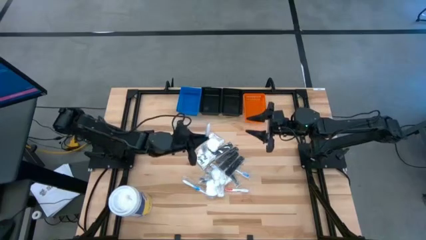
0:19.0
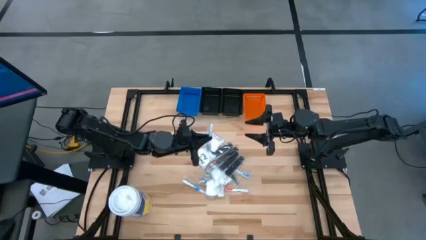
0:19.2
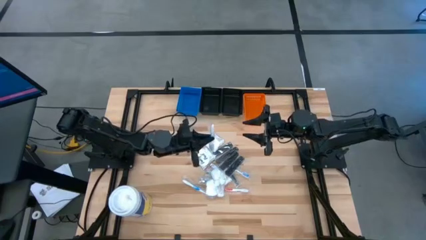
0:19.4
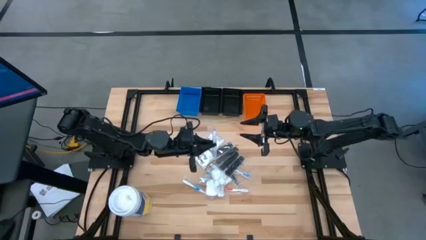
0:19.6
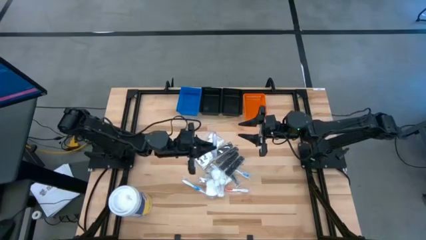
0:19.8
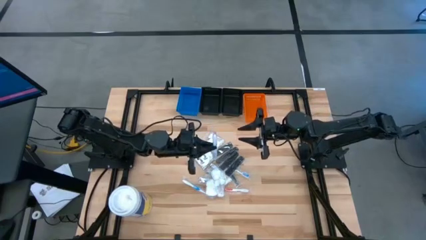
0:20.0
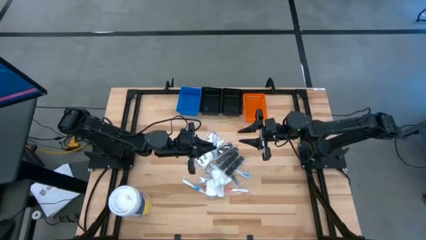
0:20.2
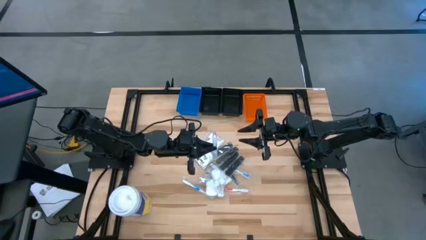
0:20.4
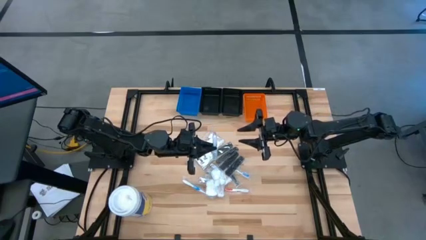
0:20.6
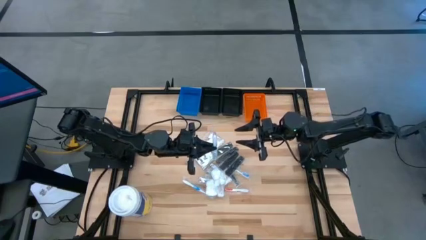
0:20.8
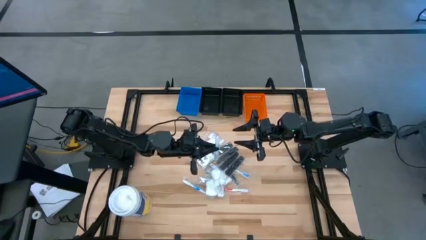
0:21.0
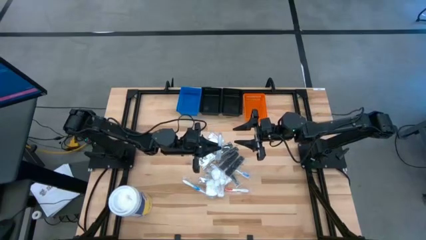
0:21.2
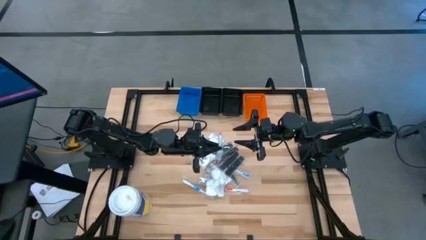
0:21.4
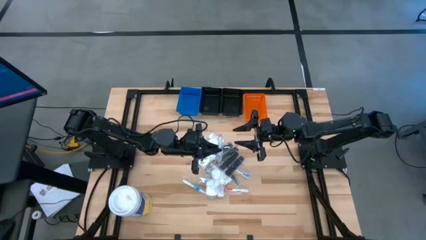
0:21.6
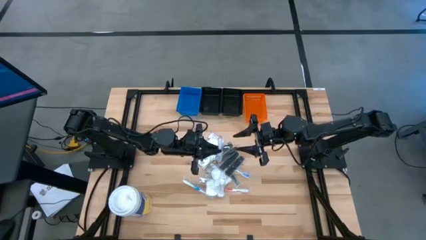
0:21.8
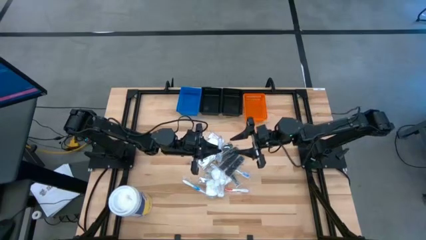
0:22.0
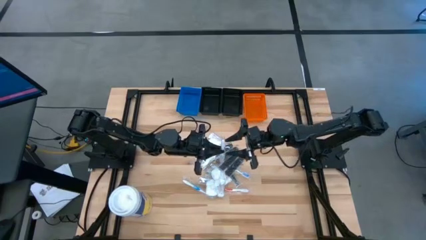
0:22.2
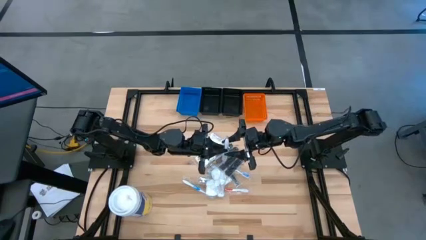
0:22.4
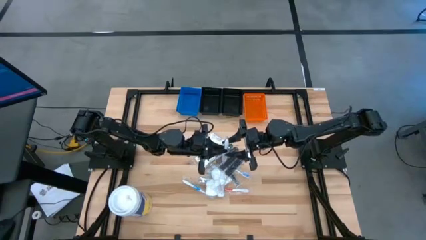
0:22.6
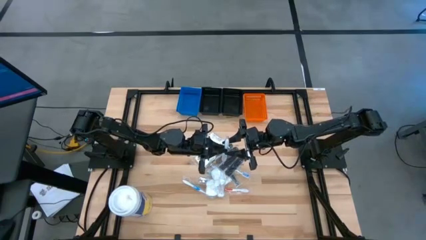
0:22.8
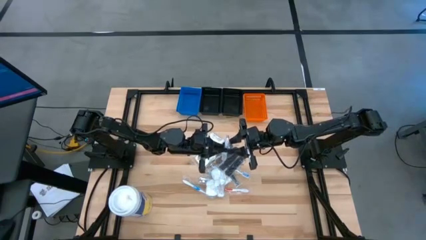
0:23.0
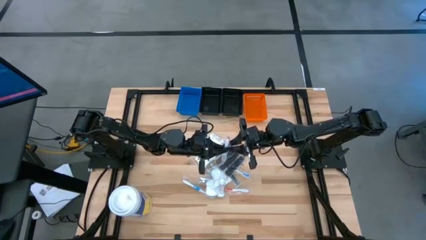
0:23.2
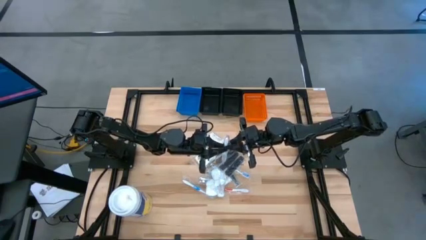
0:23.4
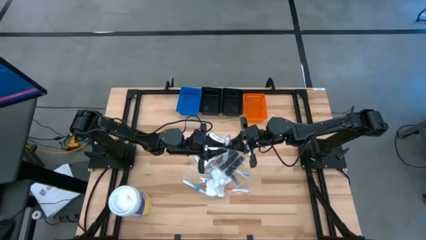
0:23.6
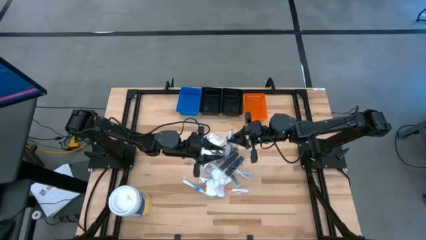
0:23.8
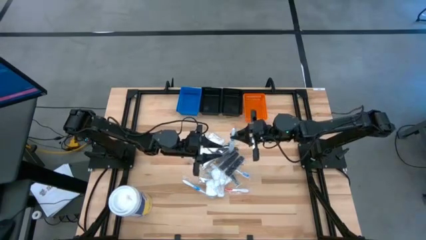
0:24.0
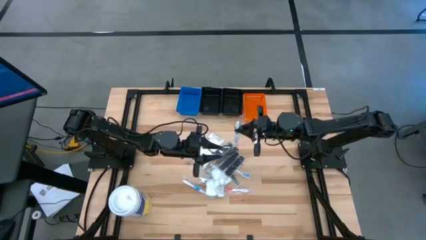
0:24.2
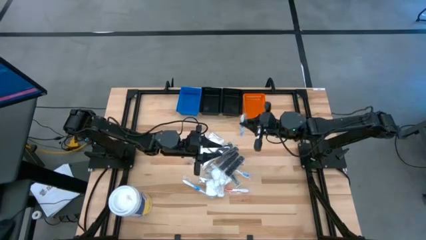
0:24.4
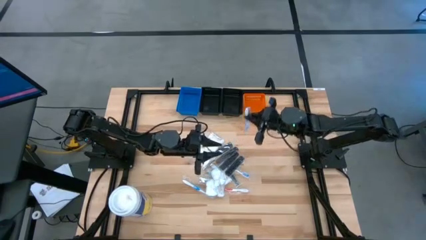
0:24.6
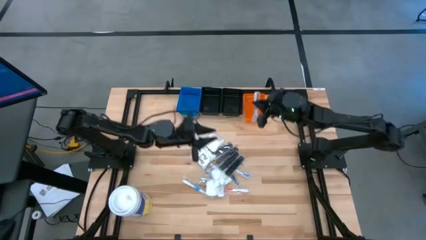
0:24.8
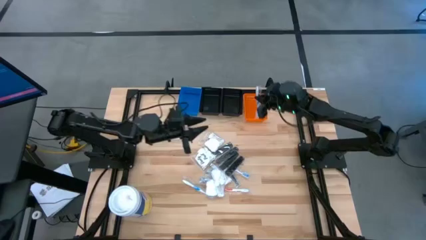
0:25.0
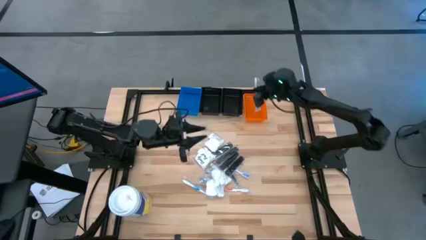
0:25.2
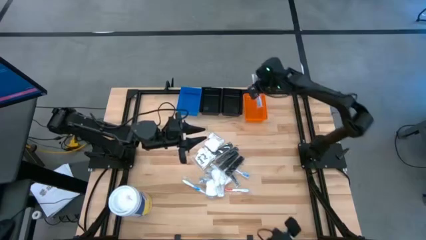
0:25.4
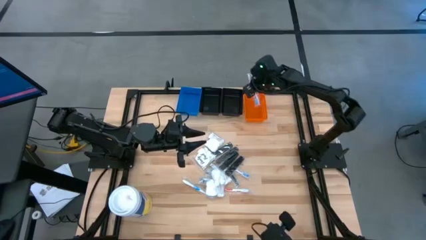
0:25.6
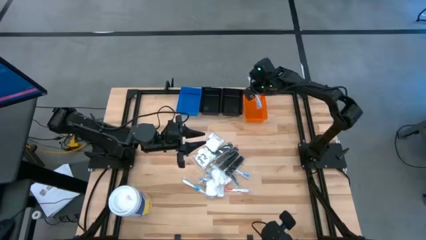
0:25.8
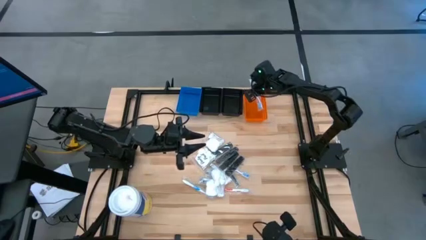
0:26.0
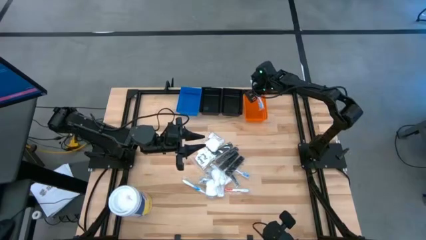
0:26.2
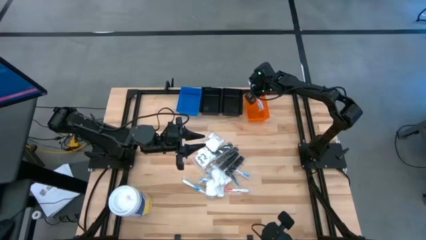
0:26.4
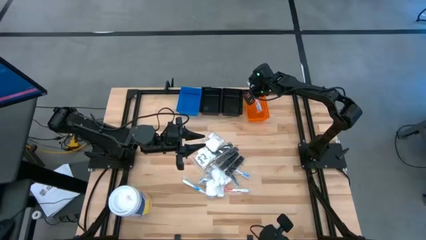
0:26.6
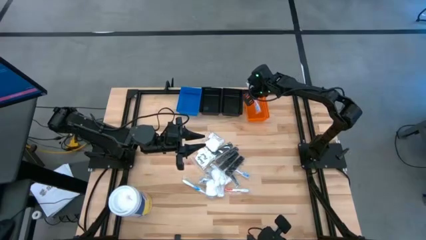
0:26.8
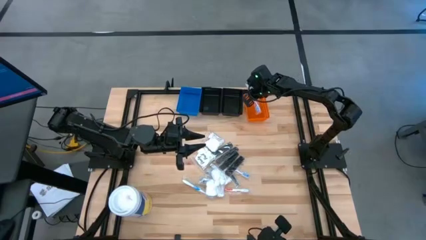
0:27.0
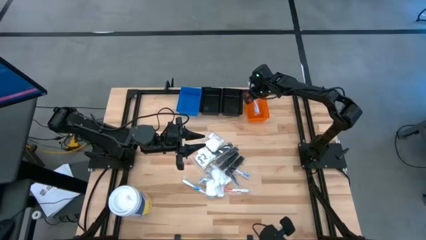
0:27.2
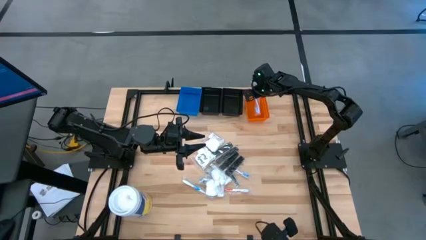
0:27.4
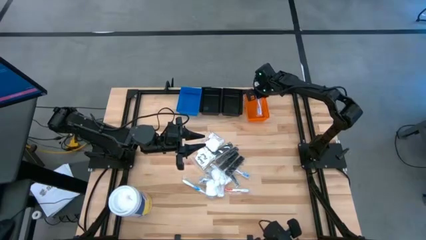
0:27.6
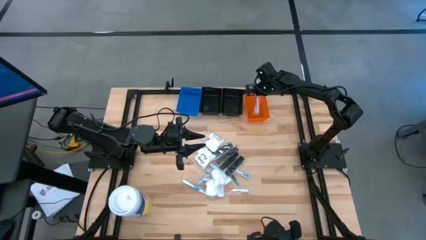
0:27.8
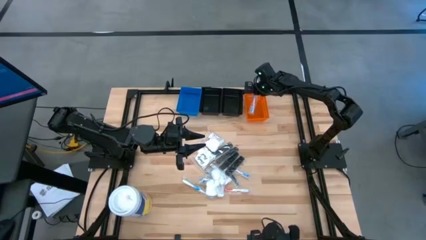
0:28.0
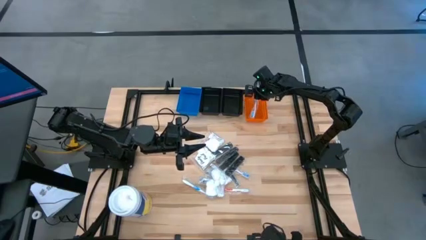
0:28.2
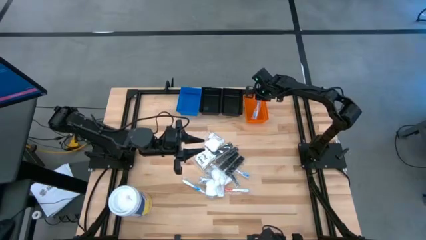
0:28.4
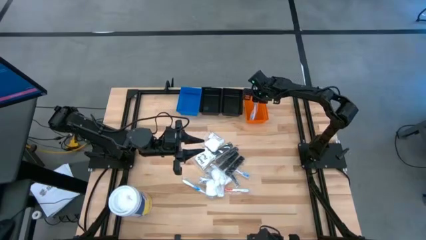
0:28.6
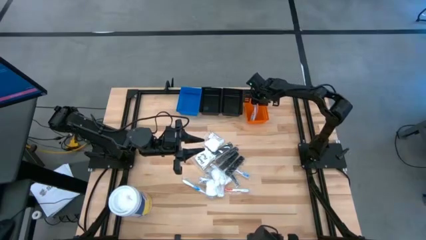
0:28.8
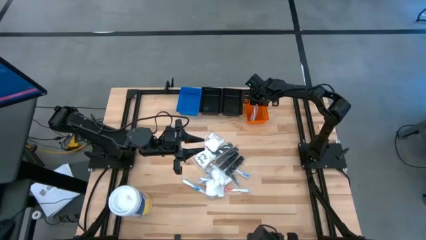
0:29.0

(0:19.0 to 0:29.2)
Task: Pick & Place Travel size toiletries
Put the blue toothbrush into the orange bin

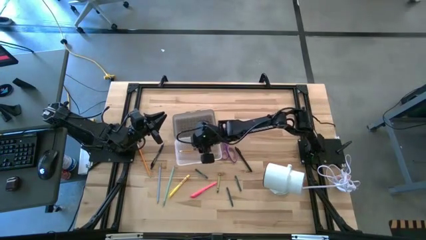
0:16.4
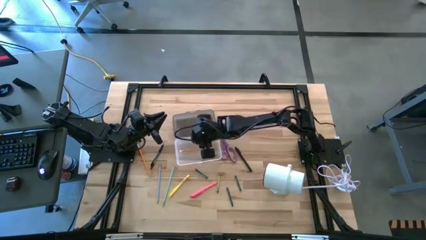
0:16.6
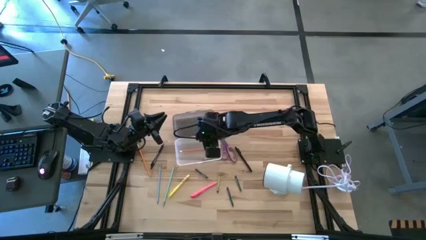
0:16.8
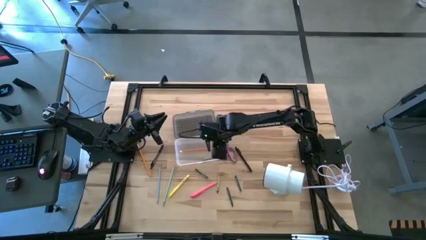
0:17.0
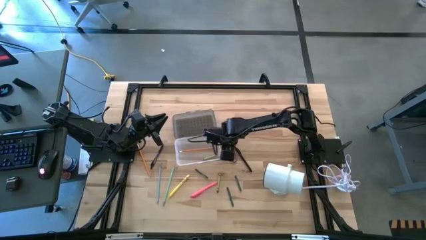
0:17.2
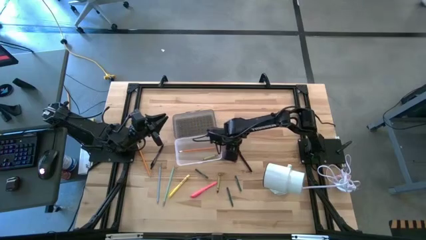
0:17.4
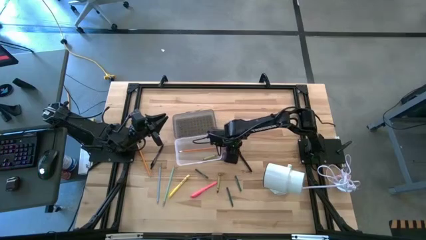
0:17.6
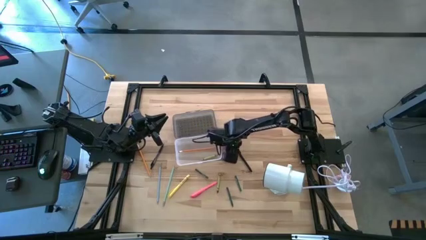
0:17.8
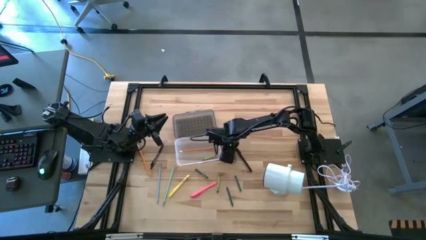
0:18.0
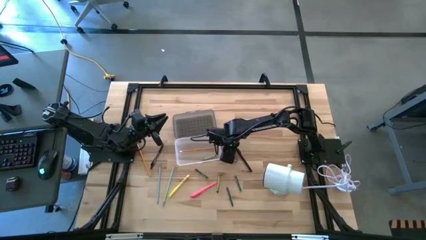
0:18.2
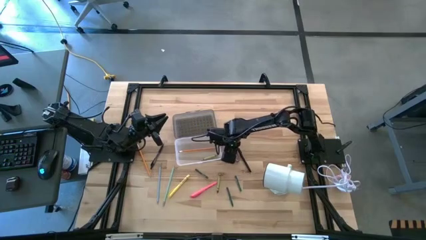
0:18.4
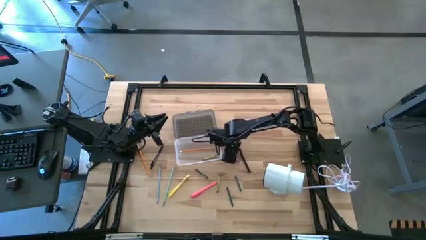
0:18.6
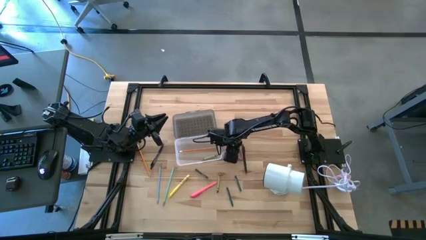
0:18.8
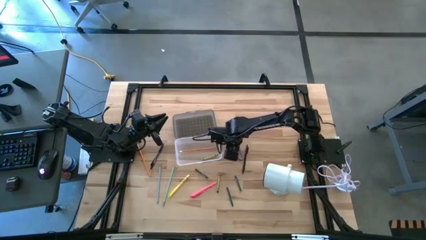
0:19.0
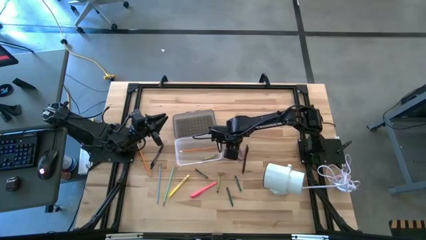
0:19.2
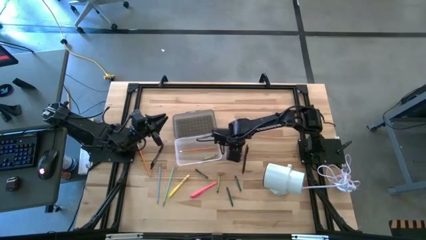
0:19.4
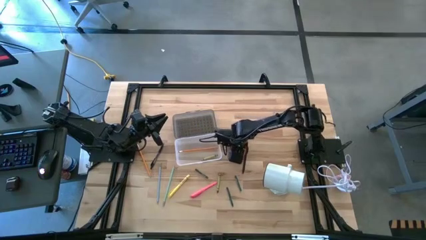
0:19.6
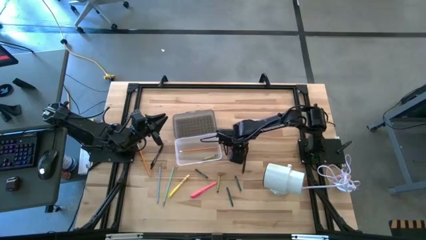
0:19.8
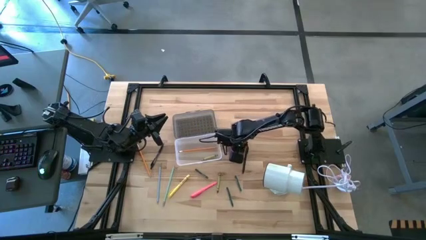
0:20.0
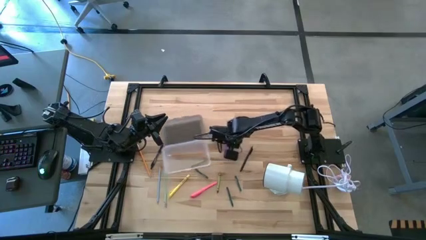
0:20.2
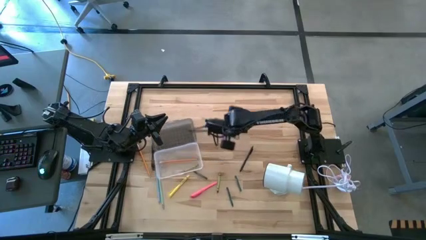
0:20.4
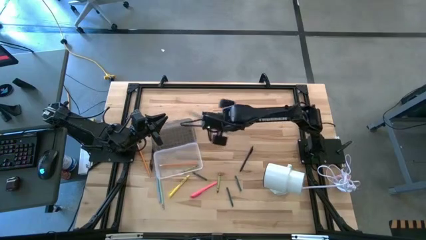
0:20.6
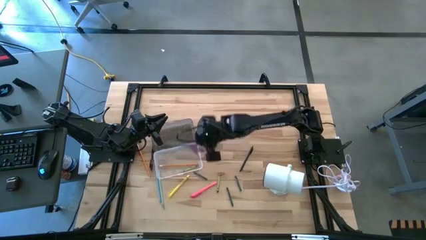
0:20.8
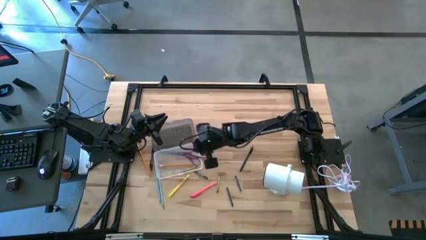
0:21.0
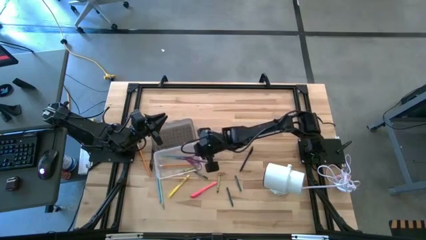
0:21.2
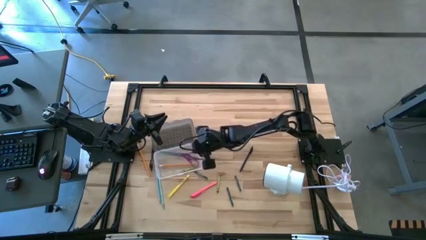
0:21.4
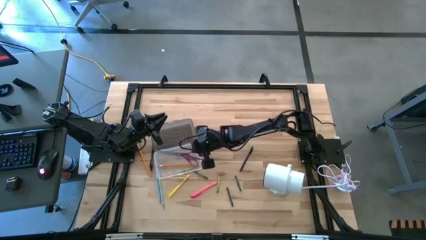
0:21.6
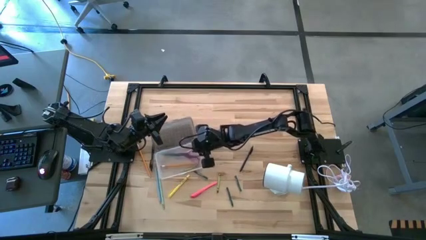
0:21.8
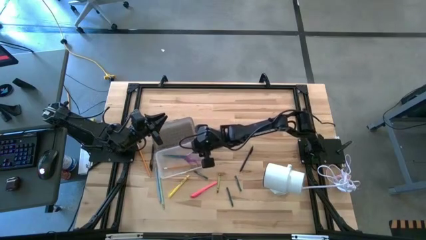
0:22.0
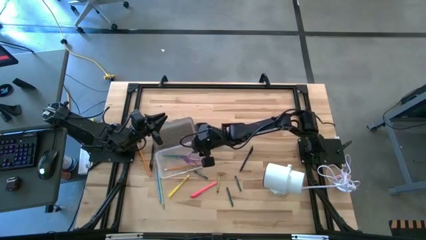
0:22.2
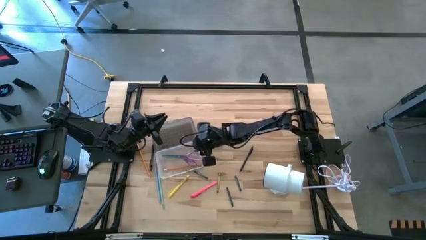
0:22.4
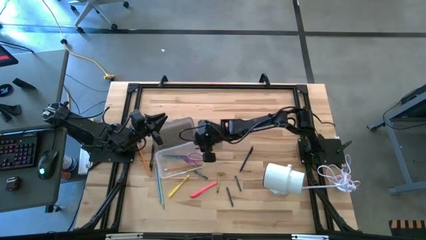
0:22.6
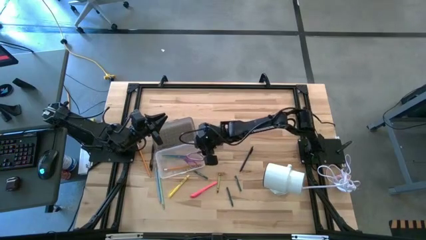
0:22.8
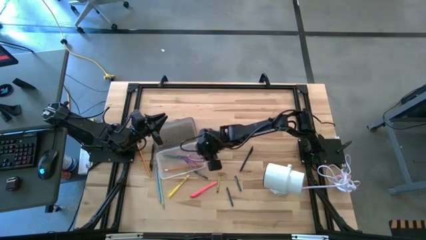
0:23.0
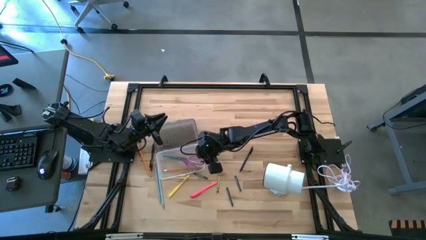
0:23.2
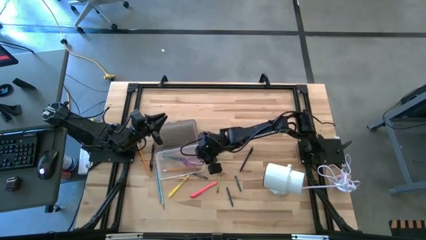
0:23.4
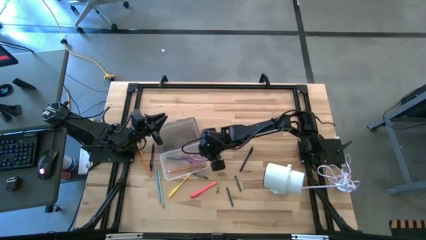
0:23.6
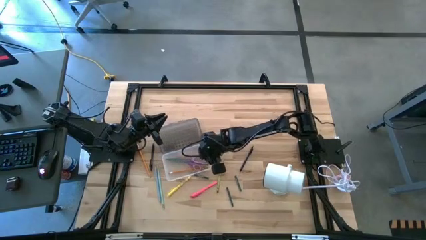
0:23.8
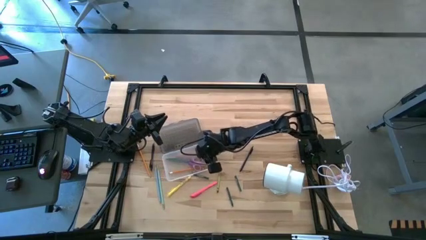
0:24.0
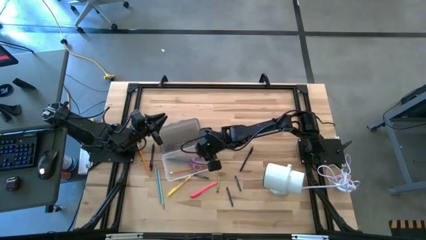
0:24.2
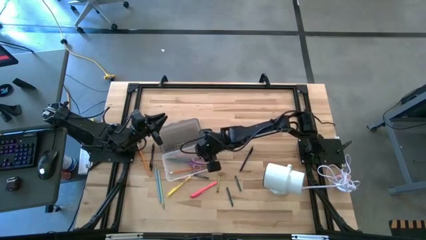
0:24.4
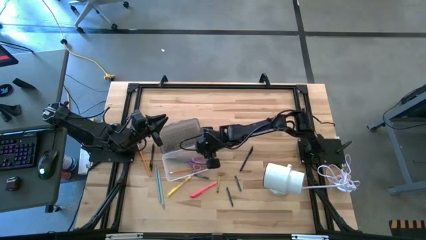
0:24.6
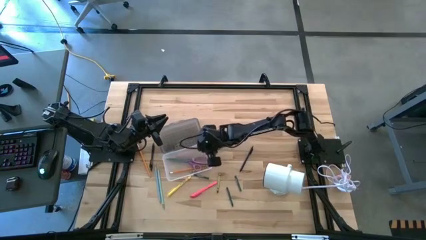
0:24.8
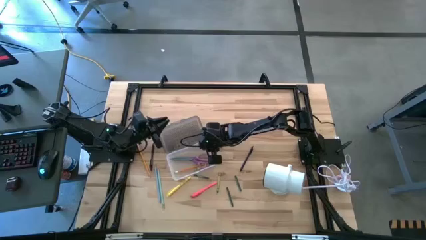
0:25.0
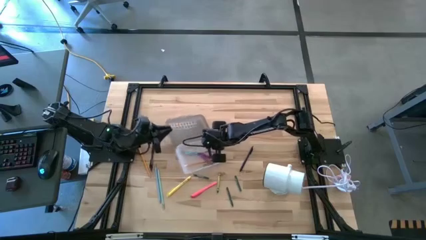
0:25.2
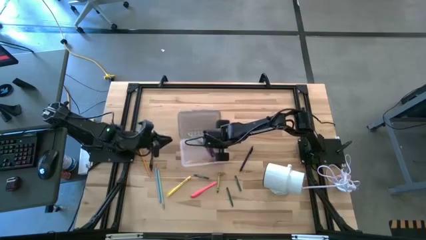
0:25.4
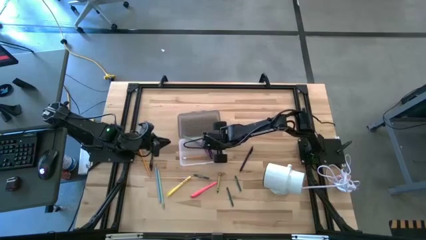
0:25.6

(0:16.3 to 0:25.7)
Task: Pick & place school supplies into a supply box
Put the purple scissors into the gray supply box
